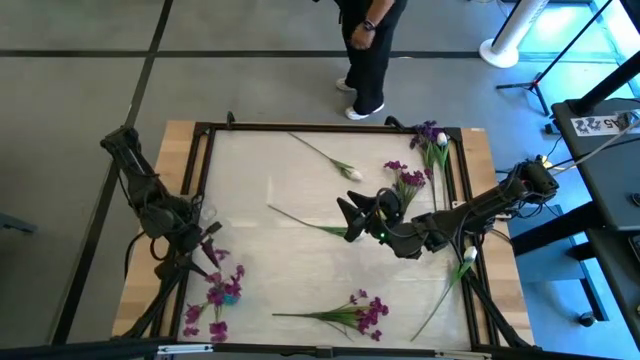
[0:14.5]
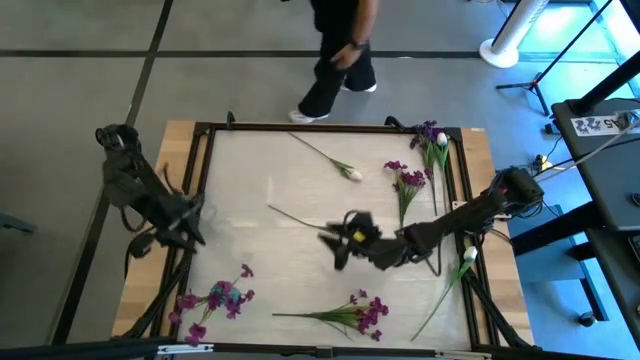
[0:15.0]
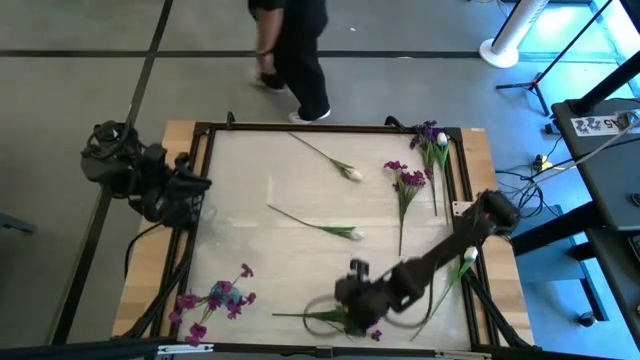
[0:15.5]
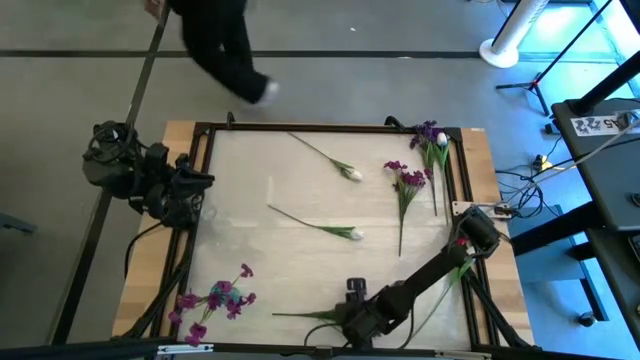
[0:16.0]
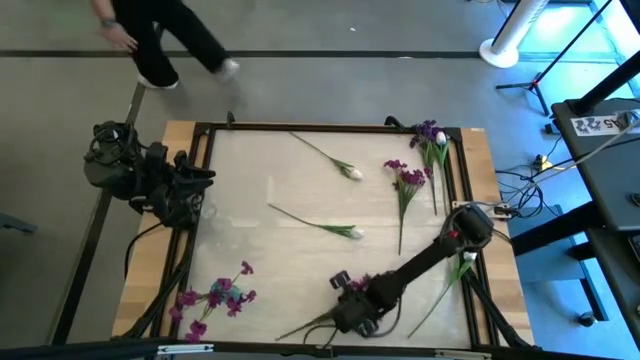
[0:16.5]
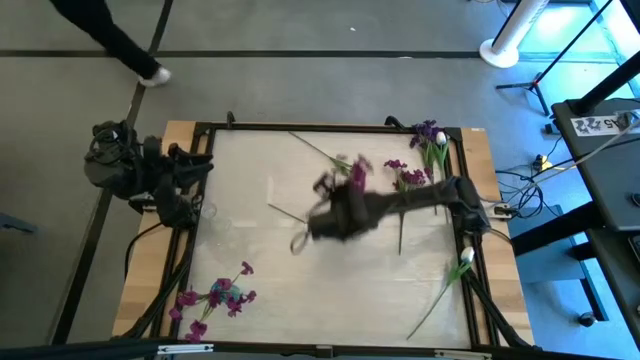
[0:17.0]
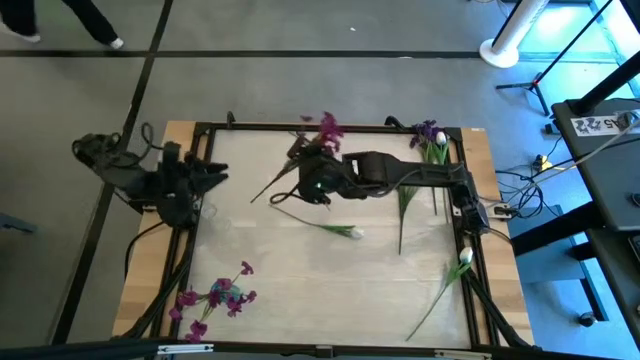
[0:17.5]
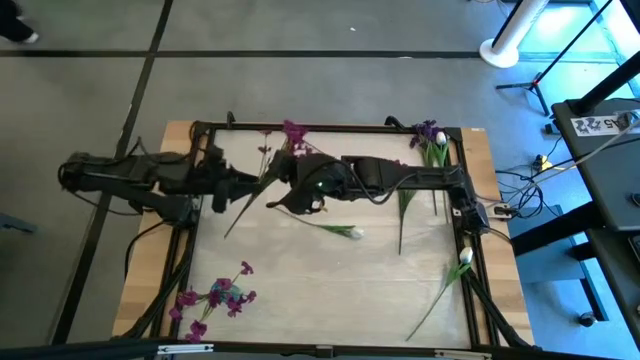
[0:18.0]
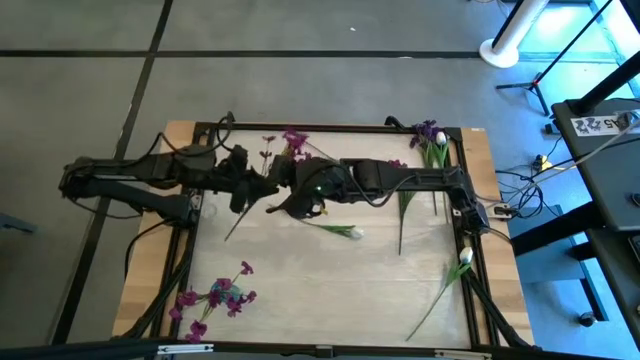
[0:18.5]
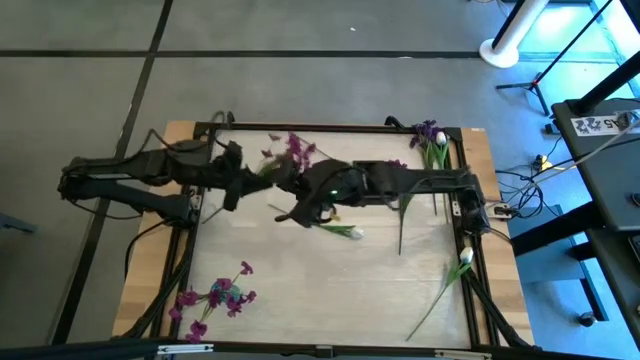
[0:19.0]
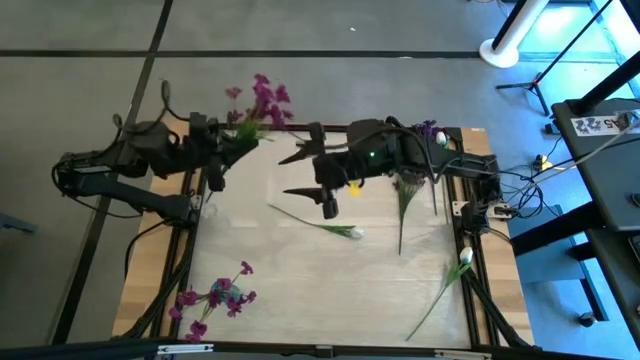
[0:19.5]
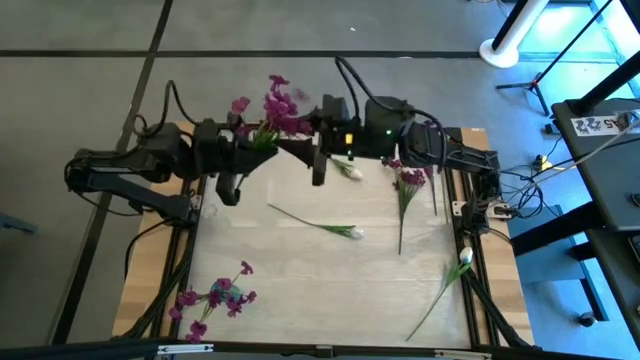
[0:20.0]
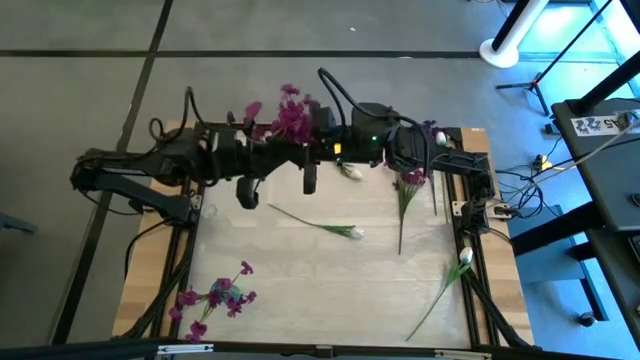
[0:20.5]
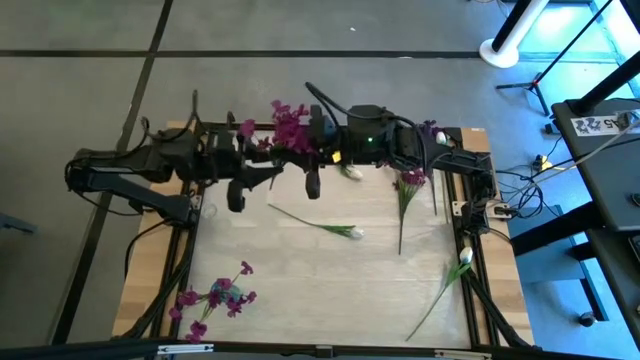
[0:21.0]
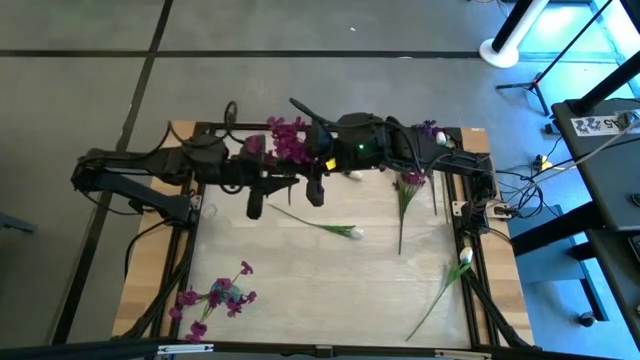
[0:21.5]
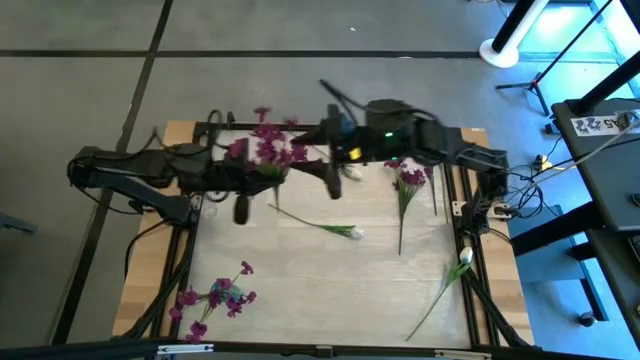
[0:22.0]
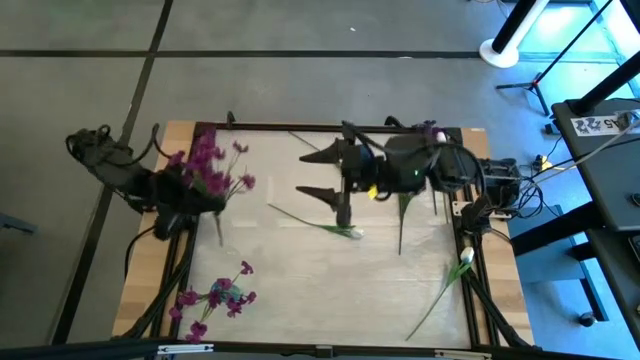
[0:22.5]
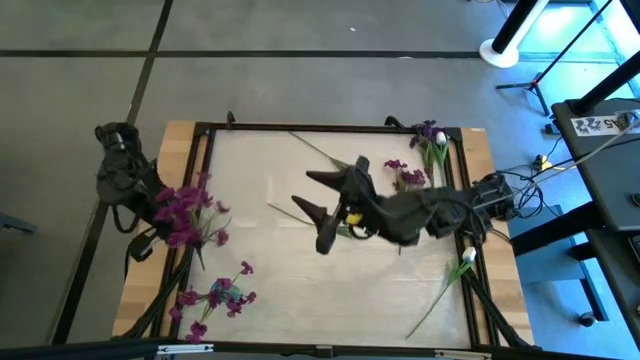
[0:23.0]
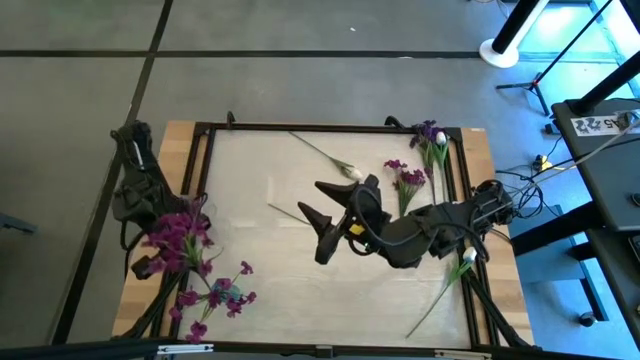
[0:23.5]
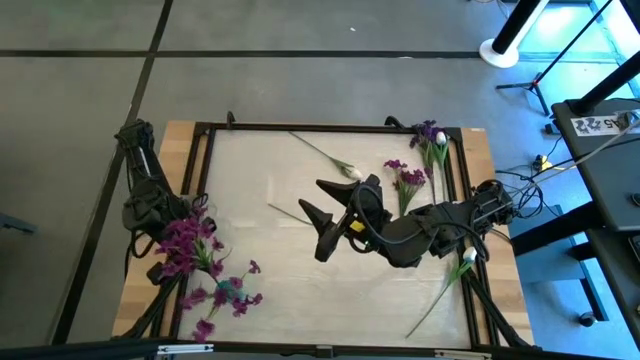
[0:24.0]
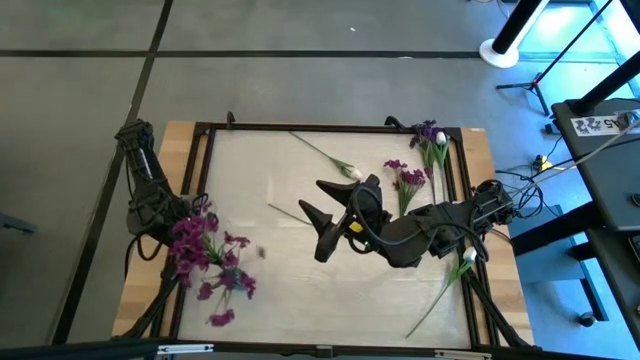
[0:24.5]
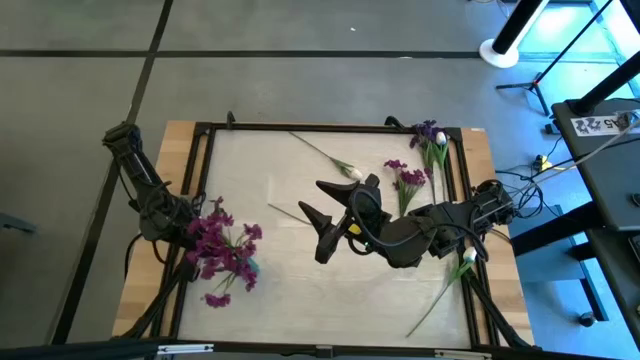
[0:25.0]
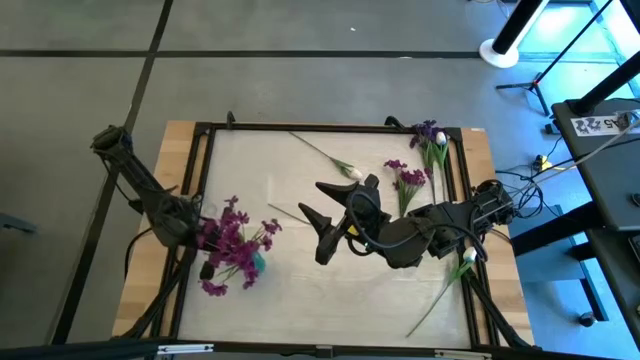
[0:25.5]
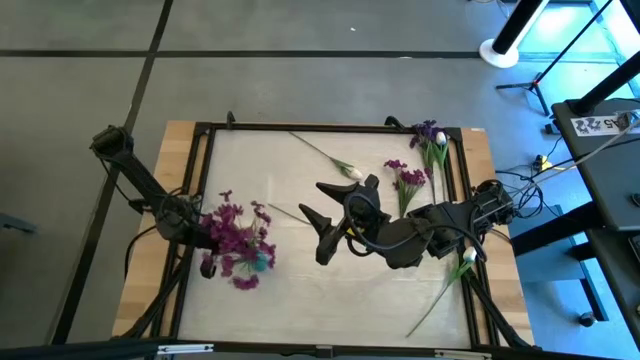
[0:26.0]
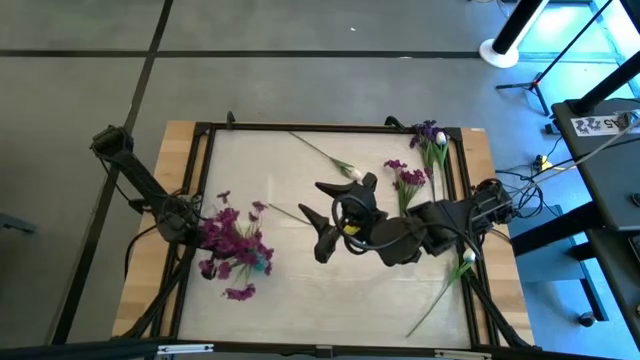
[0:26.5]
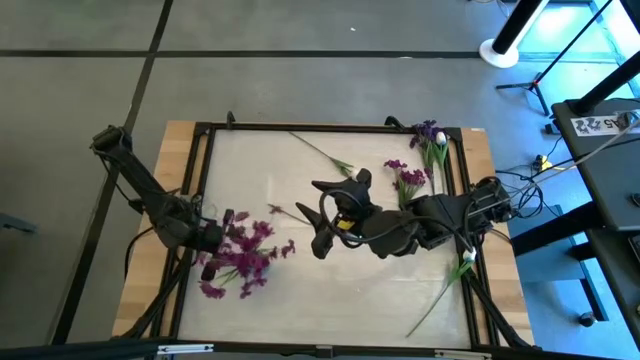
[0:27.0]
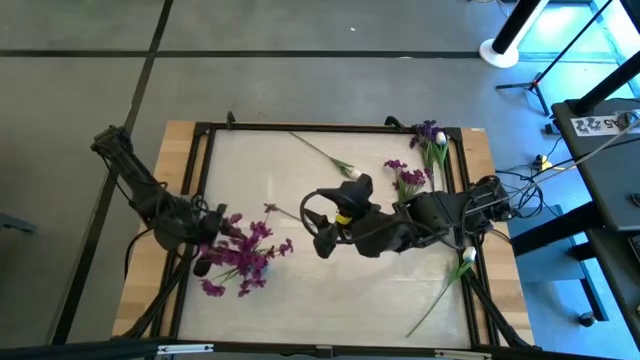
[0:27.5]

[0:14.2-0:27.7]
Task: Sort flowers into vase by color
Put the bottom light purple flowers into the blue vase

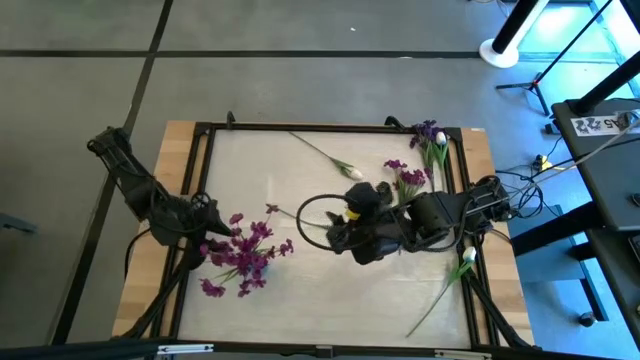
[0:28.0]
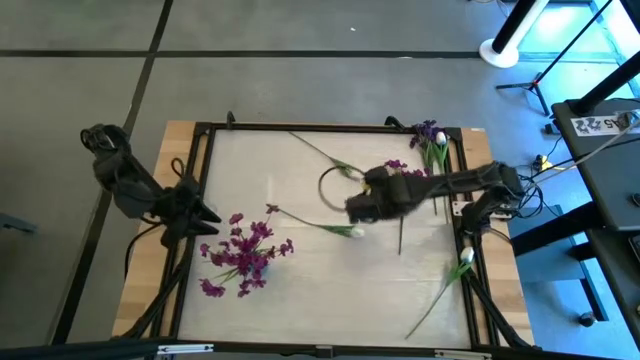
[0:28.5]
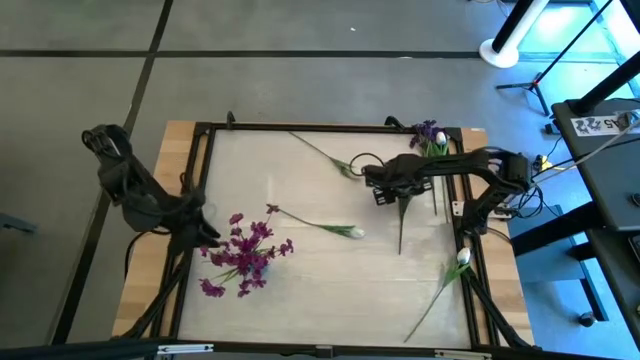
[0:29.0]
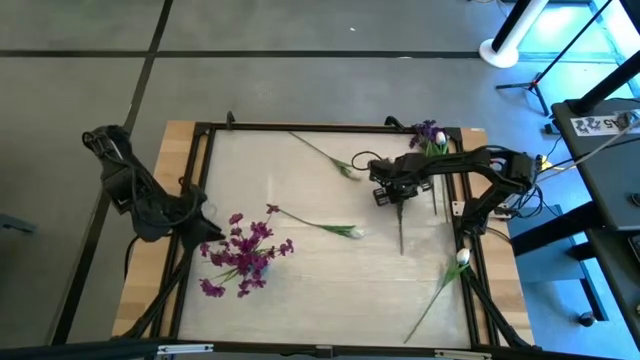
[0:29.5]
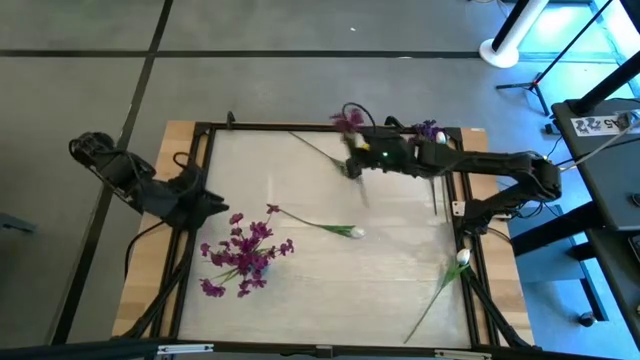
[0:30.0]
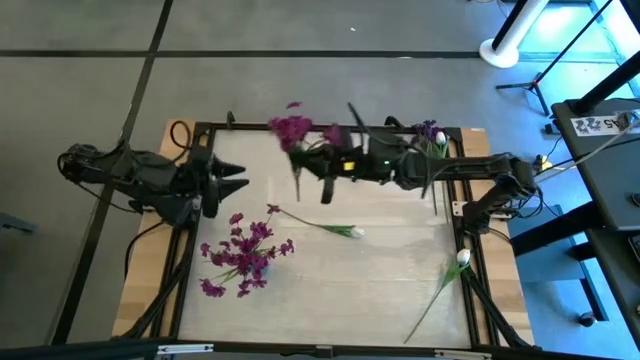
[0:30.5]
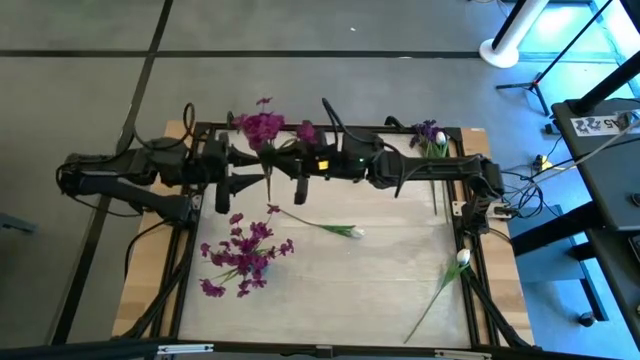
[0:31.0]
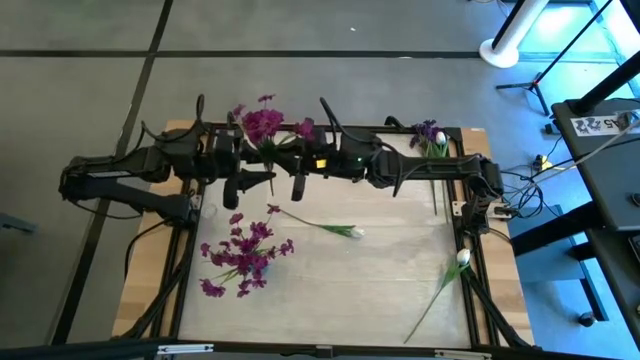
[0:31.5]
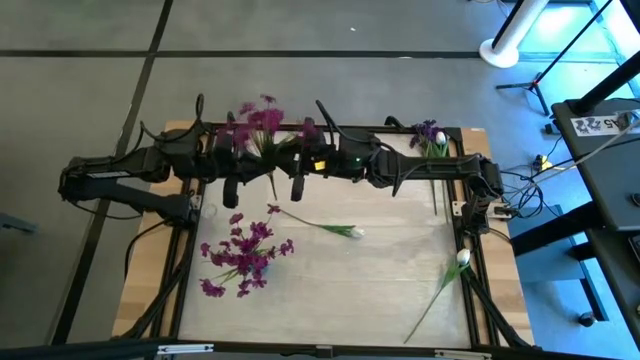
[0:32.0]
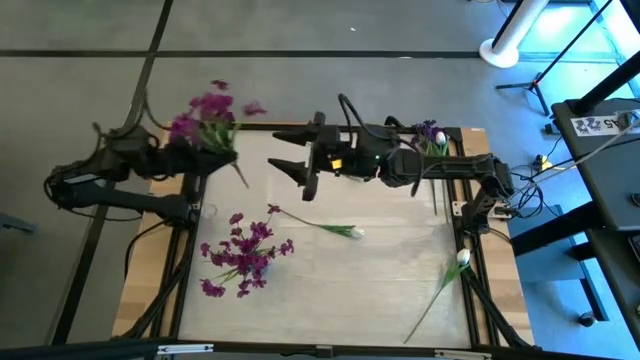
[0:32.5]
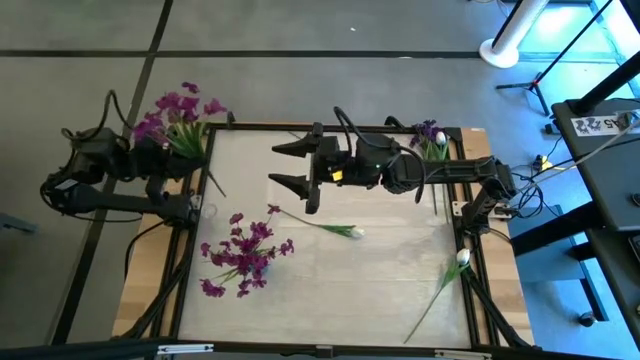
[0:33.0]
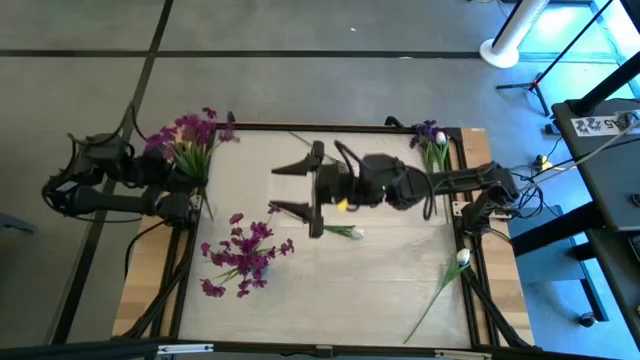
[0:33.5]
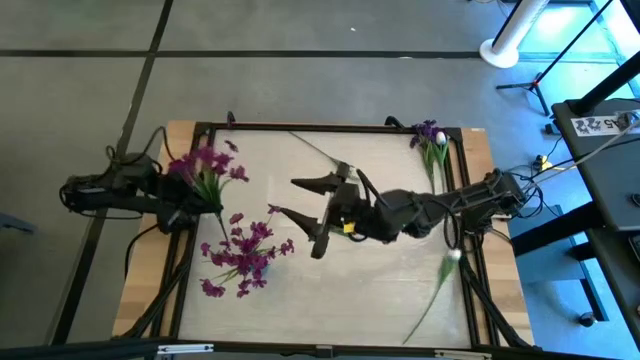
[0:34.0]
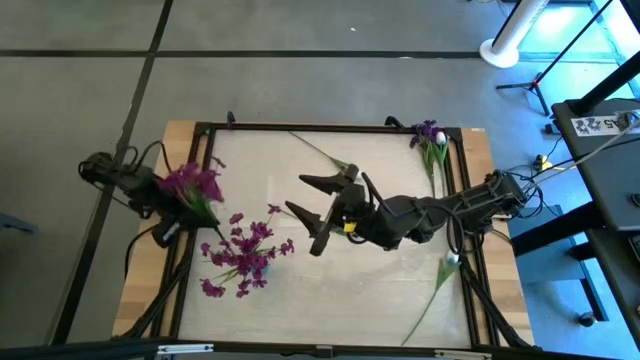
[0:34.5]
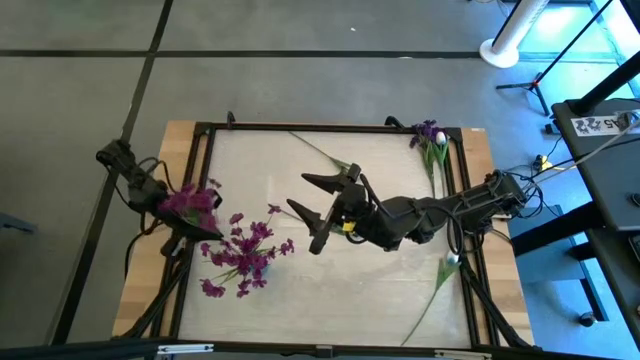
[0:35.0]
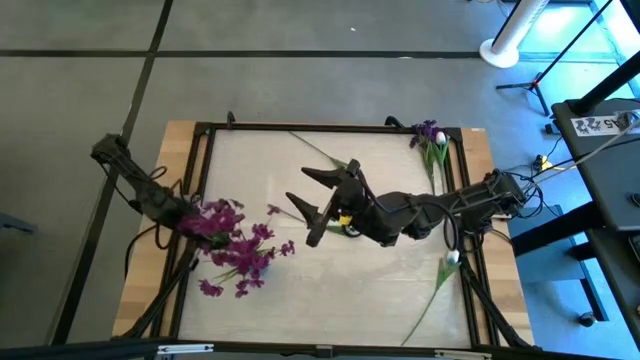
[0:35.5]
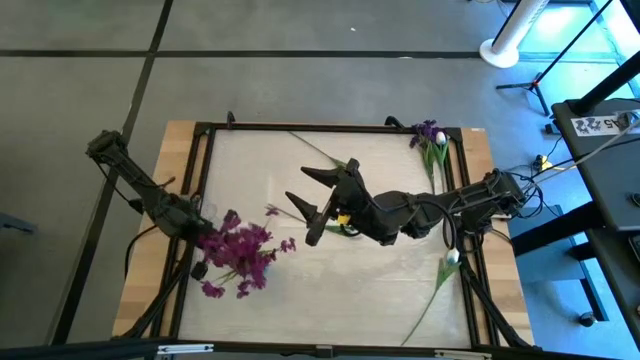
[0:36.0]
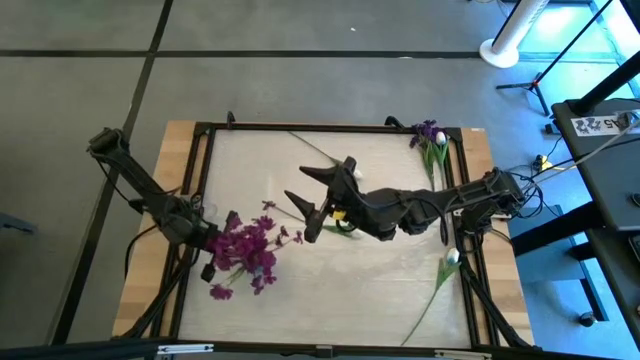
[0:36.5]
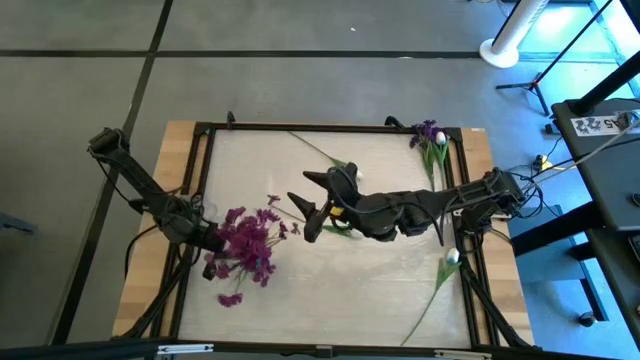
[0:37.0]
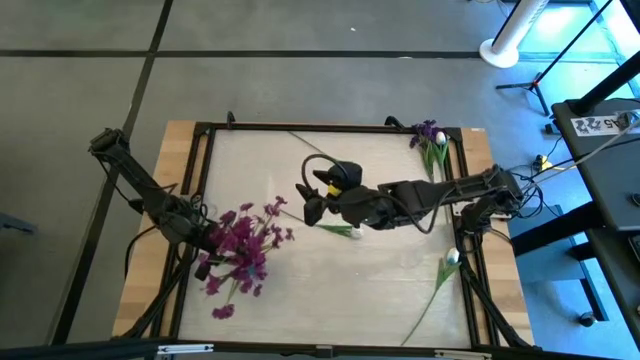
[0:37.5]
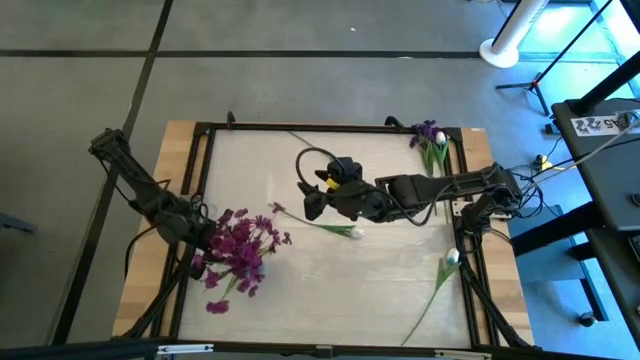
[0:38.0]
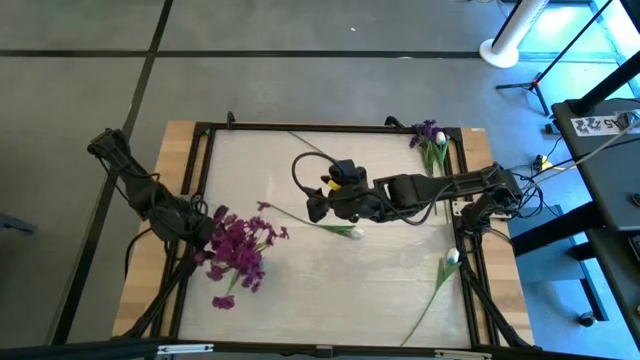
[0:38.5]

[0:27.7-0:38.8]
Put the light purple flowers into the blue vase
